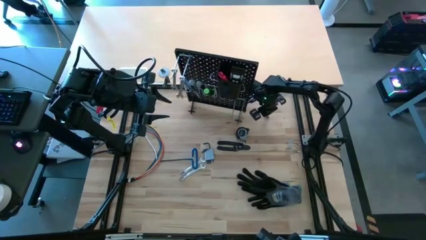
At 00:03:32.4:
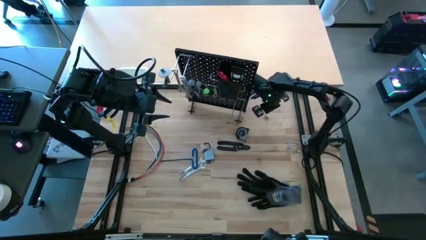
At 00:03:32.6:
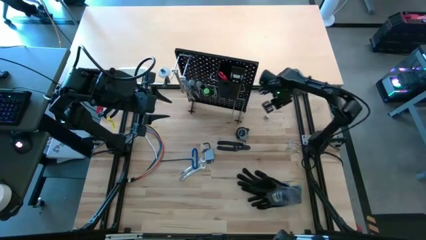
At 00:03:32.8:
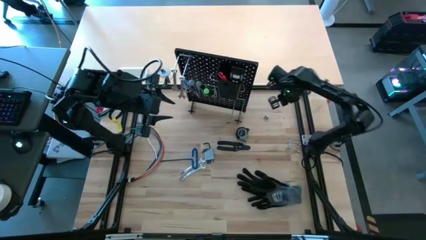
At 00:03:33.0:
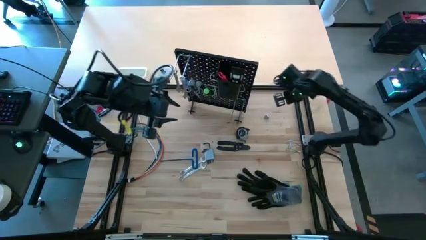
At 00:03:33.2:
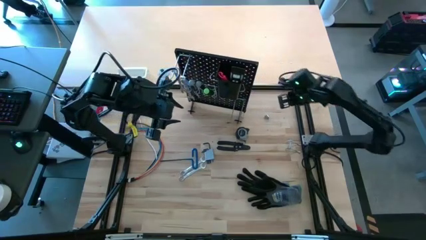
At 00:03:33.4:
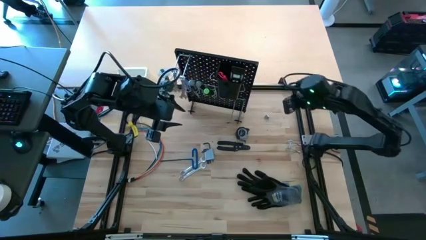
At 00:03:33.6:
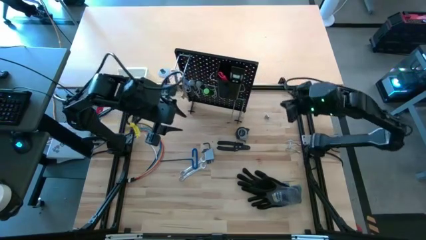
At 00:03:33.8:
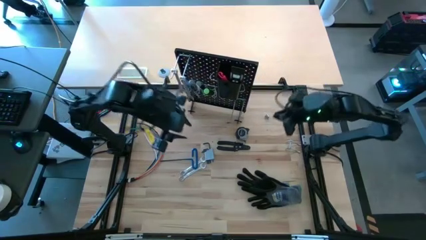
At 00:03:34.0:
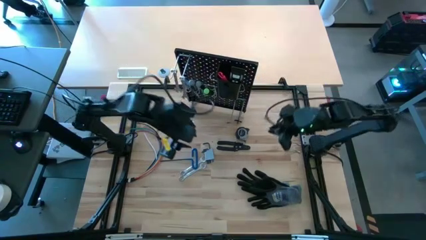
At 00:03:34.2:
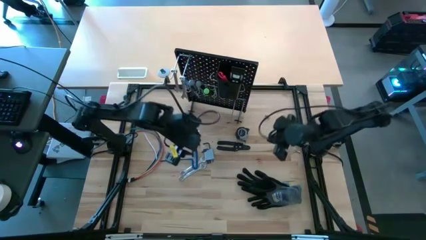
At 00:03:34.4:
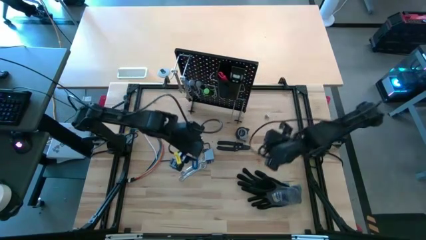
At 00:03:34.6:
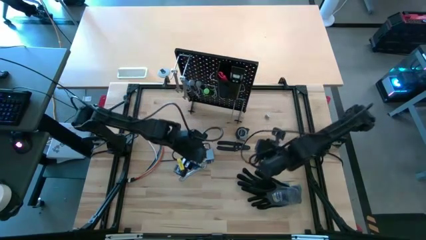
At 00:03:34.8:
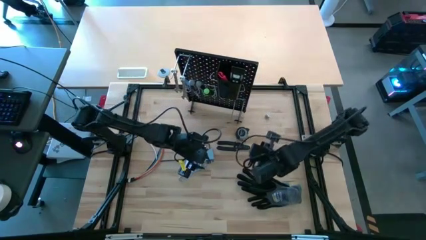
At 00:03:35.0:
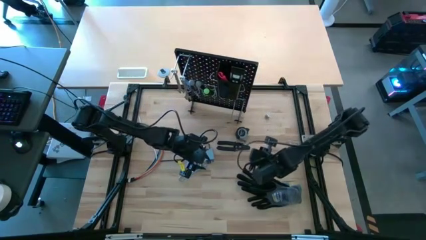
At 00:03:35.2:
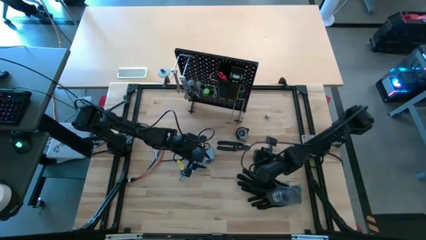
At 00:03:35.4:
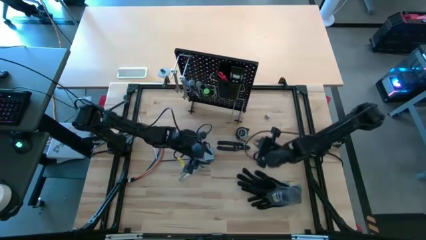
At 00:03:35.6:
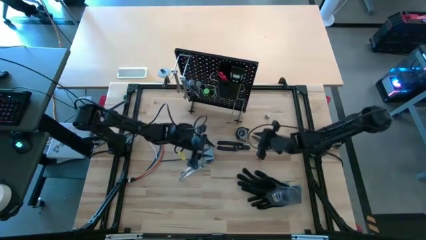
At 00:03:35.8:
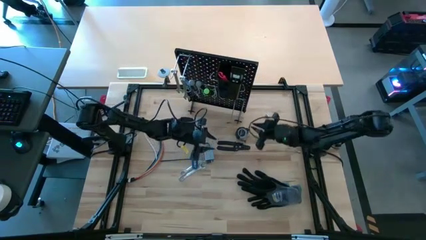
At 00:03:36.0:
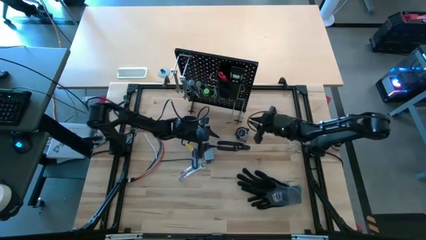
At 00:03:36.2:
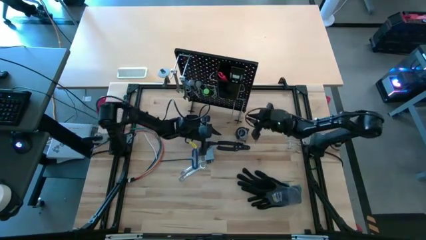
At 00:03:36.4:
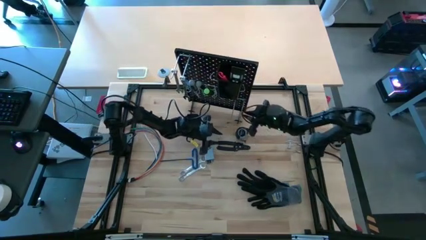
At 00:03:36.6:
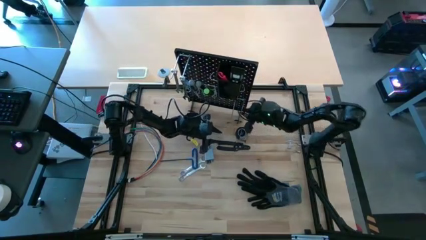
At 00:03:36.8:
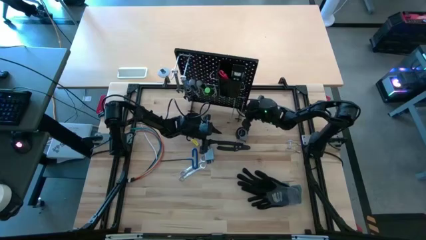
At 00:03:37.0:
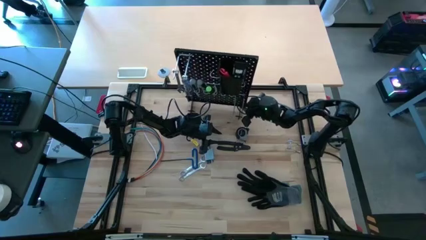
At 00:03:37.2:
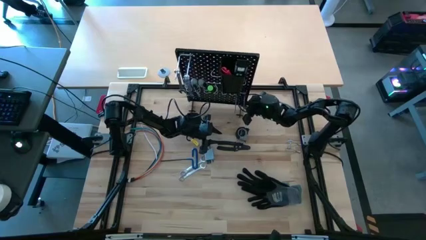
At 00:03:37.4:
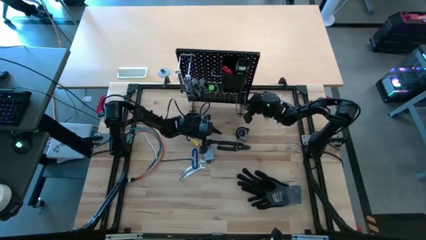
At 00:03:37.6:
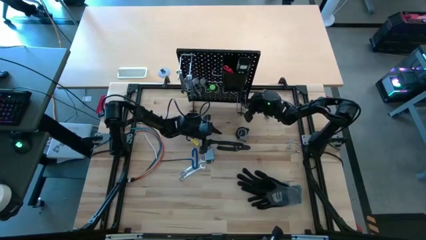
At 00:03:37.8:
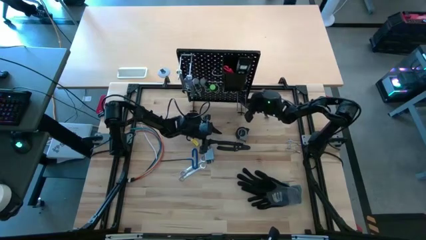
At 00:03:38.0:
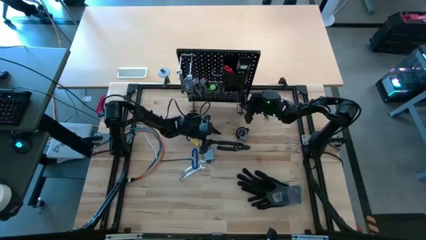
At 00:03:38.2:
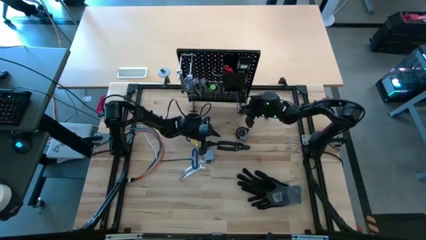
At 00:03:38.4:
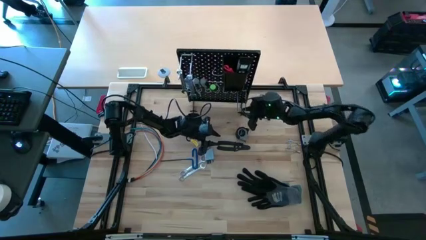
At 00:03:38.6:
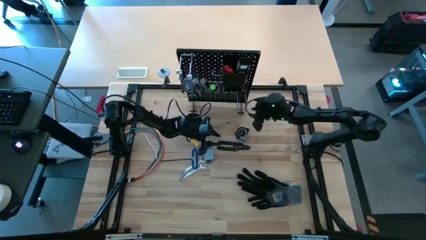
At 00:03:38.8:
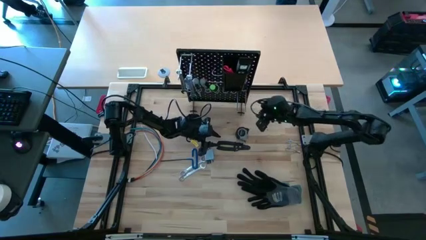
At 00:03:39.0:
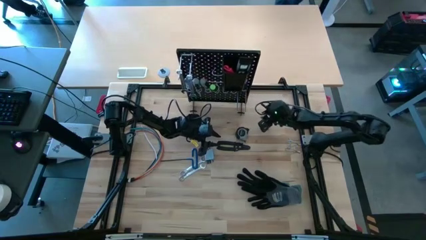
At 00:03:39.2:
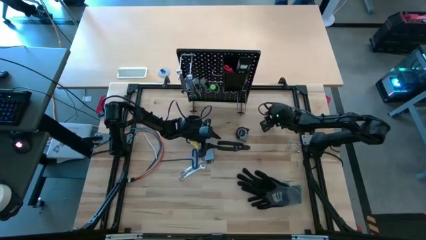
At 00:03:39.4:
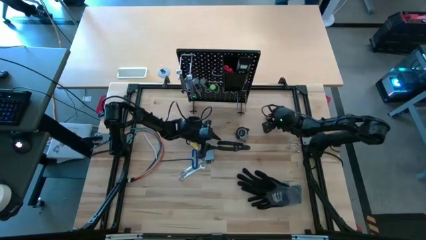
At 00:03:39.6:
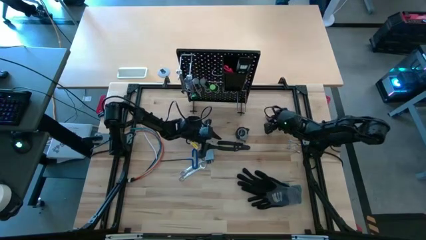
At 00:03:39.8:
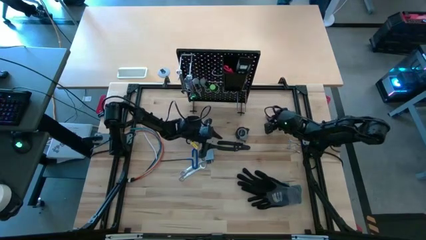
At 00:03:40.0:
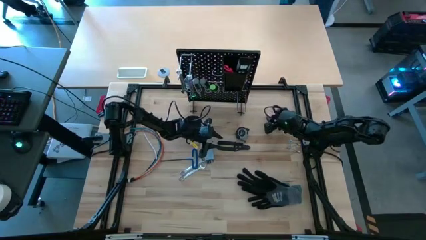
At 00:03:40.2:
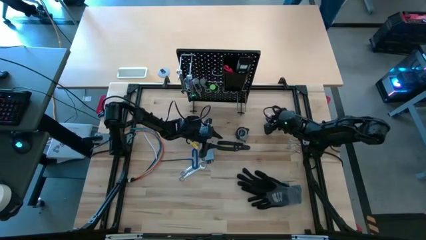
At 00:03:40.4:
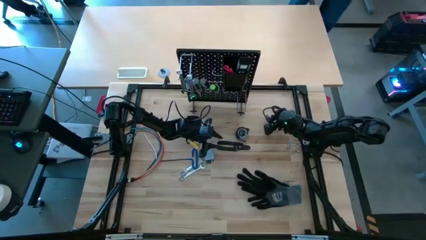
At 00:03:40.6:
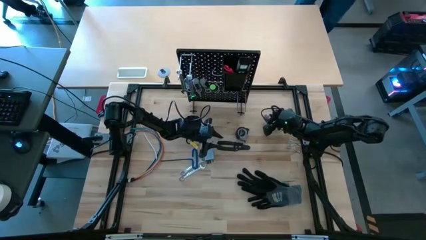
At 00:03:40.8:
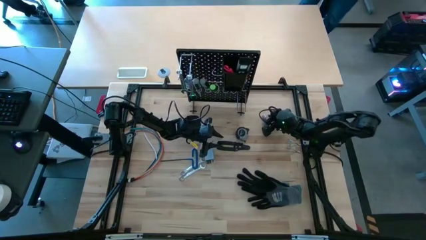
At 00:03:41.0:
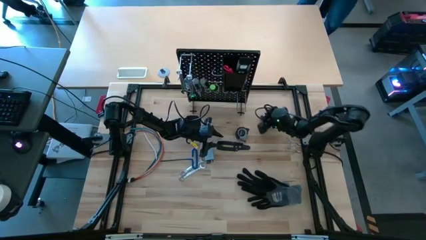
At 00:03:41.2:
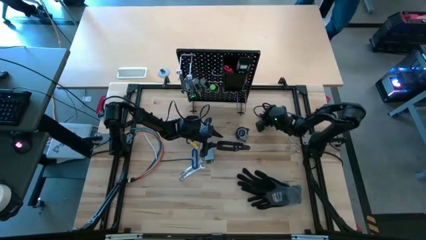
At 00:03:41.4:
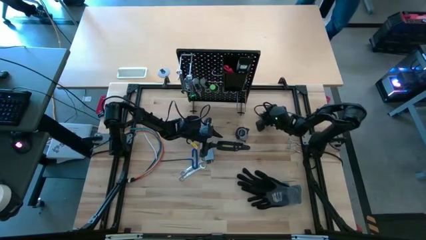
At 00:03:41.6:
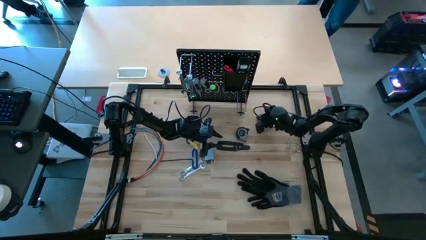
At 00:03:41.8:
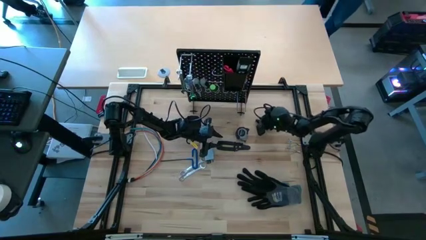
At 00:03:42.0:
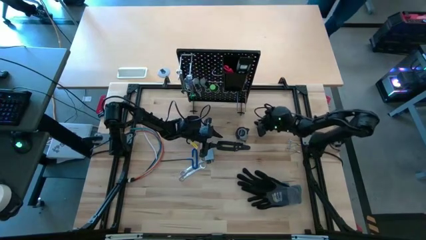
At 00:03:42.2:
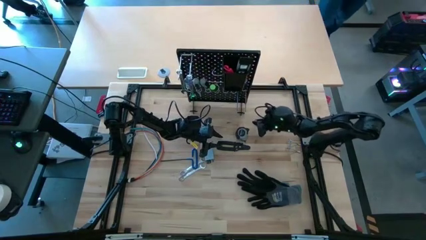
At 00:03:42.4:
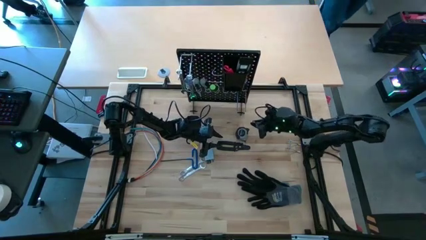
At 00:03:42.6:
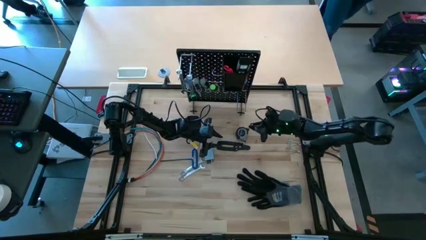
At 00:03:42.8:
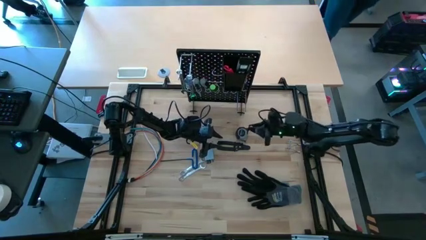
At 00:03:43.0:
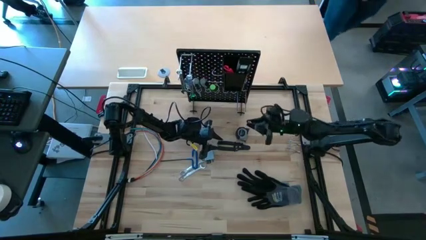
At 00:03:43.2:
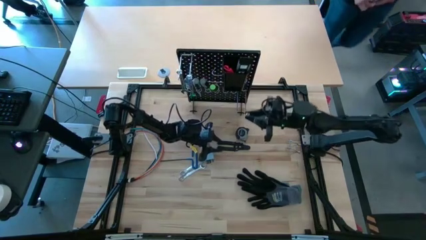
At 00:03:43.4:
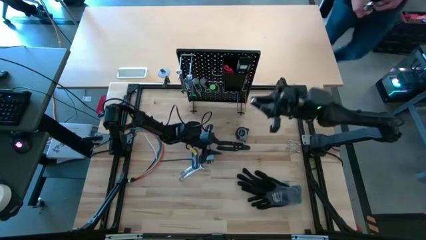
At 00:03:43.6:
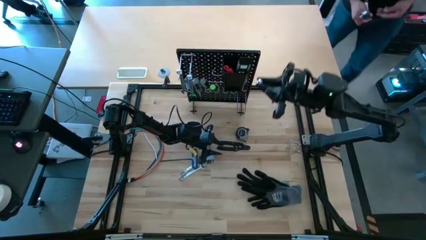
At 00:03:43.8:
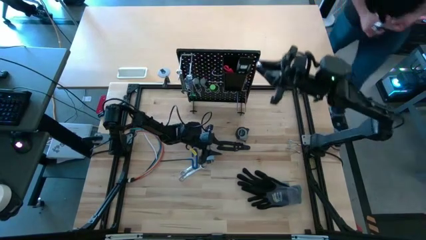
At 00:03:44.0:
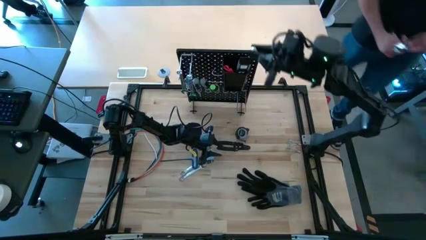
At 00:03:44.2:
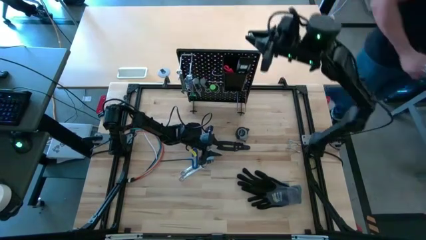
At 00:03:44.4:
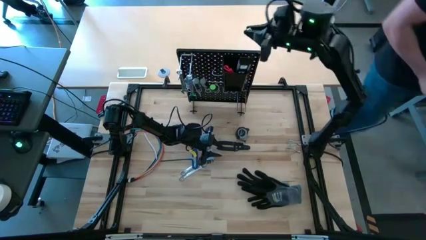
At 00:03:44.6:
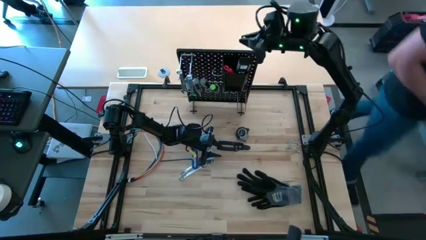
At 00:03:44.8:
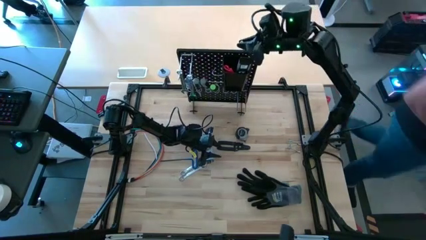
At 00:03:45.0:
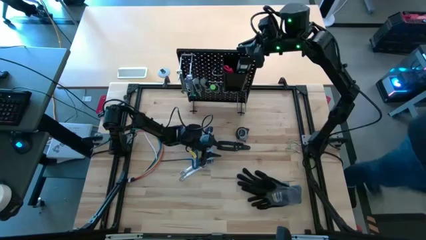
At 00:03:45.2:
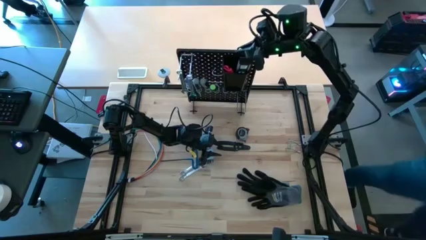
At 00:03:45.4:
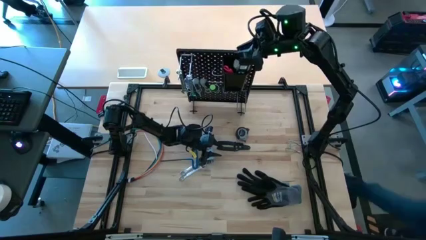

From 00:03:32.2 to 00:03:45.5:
Task: Hang tools onto peg board
Put the socket into the black bin on the peg board
